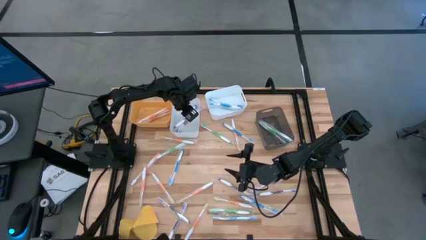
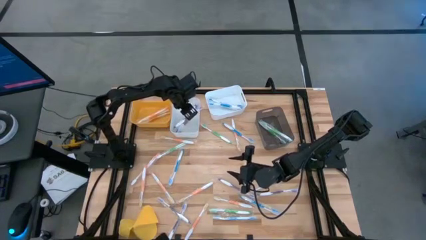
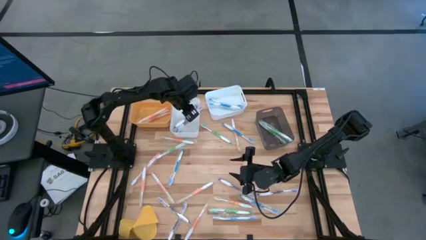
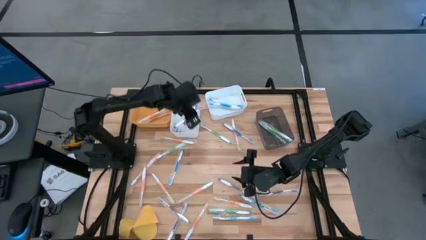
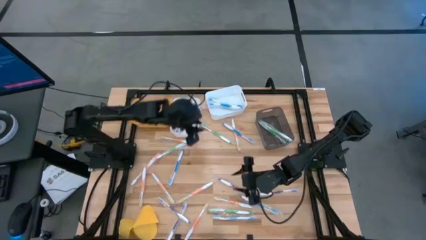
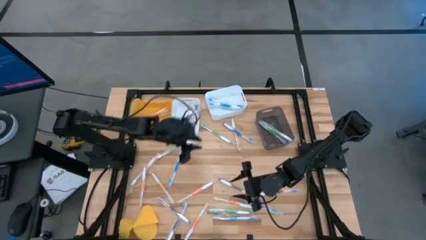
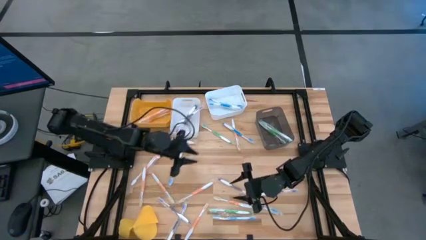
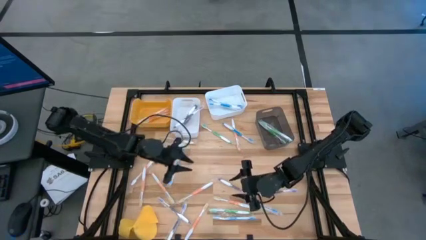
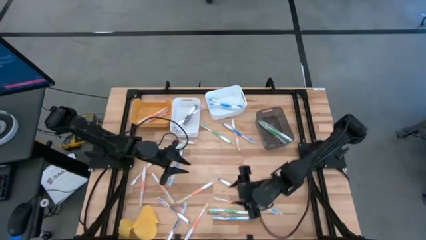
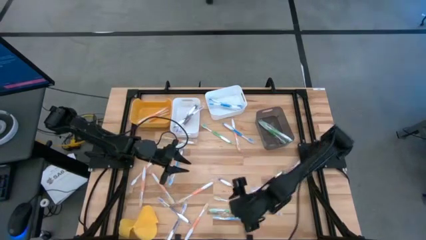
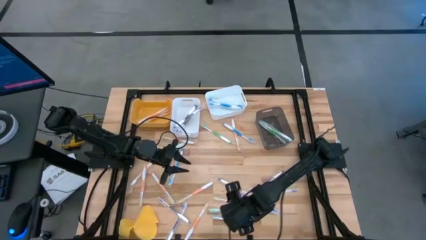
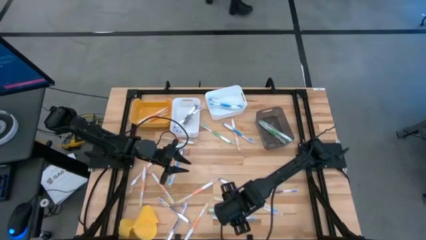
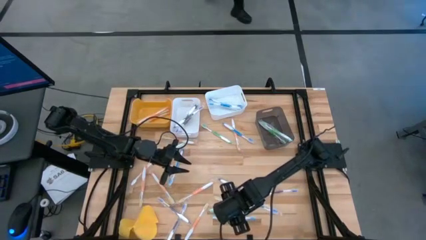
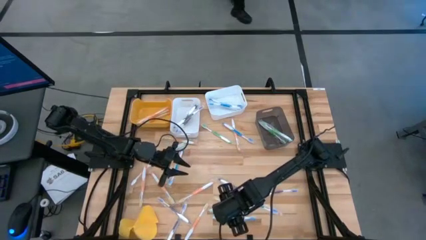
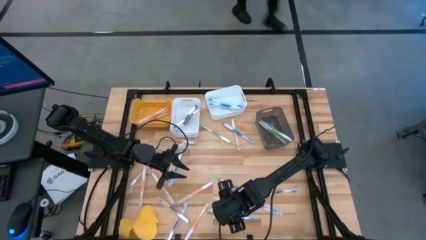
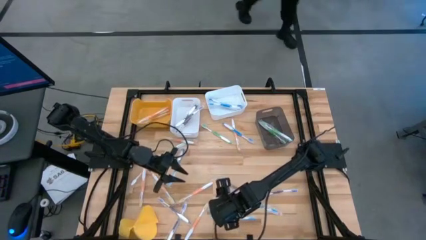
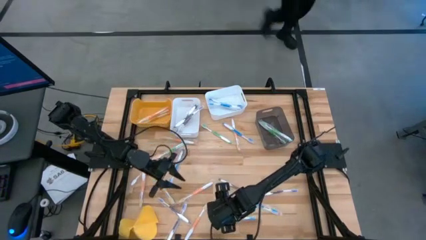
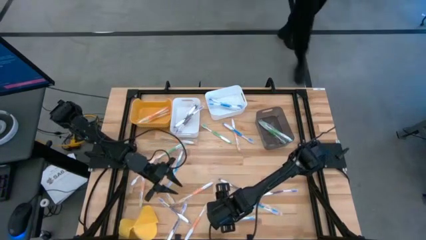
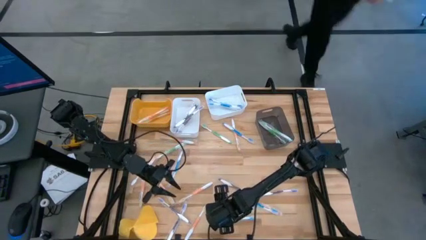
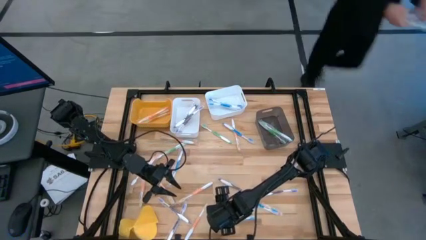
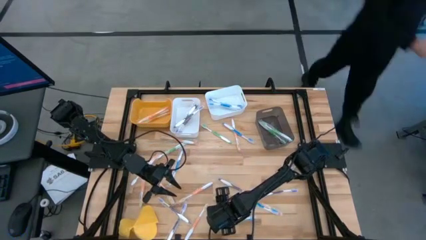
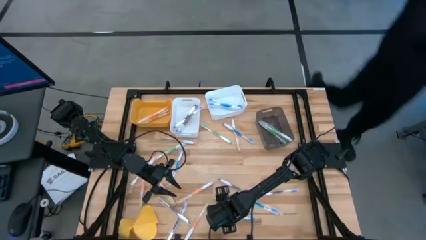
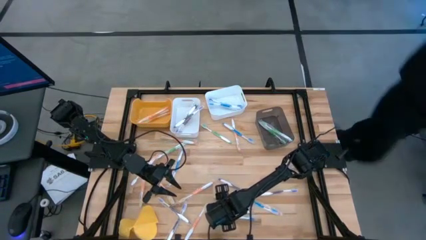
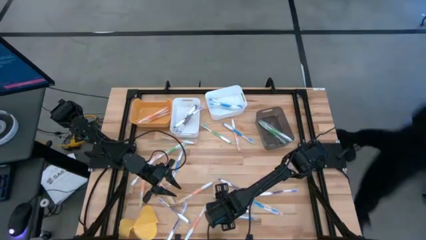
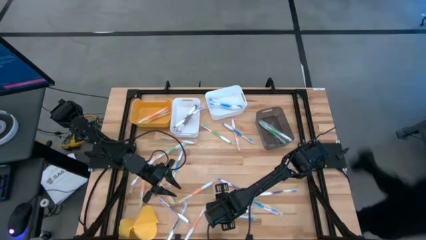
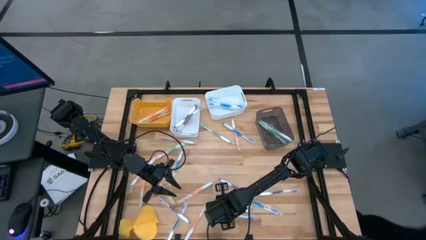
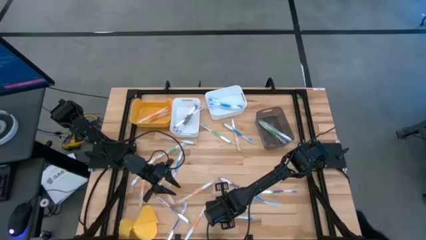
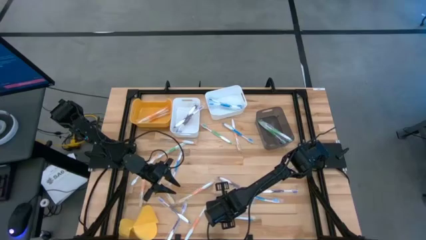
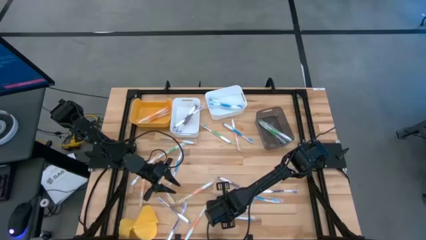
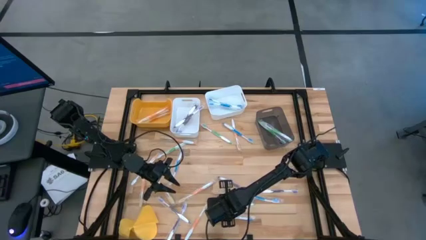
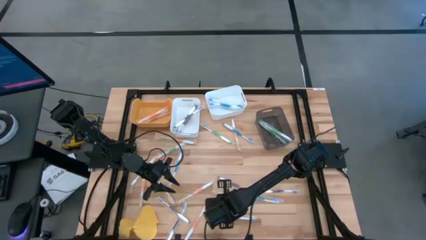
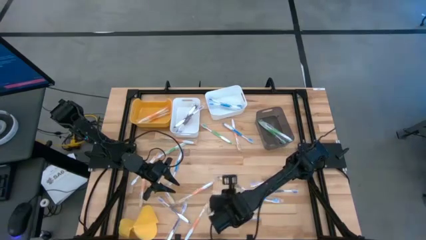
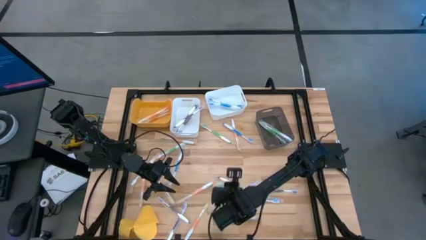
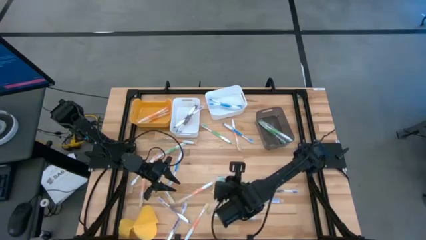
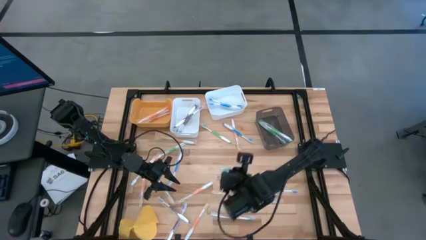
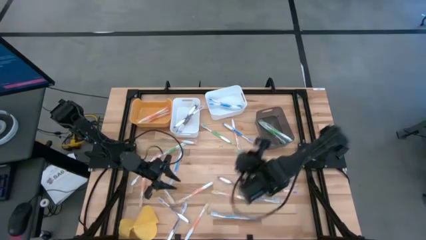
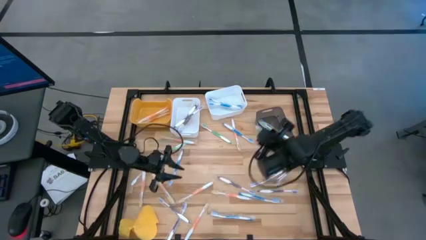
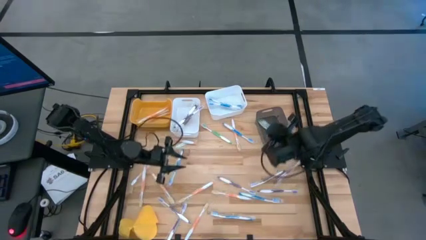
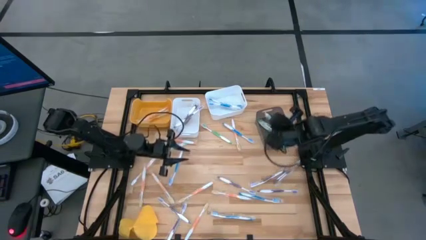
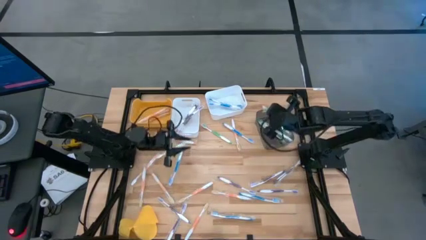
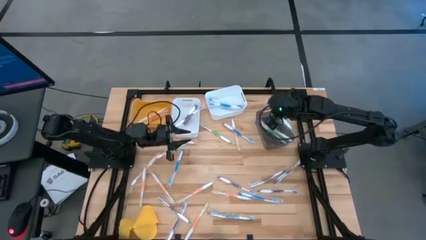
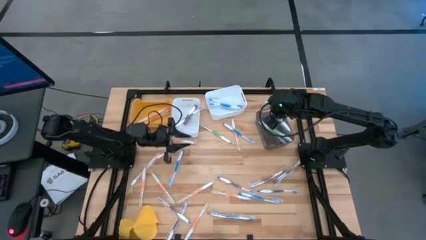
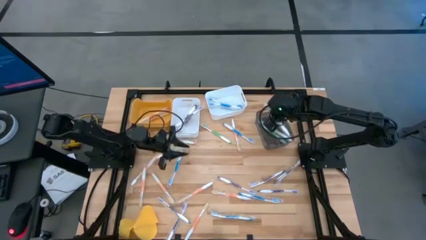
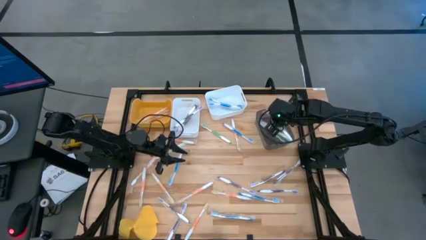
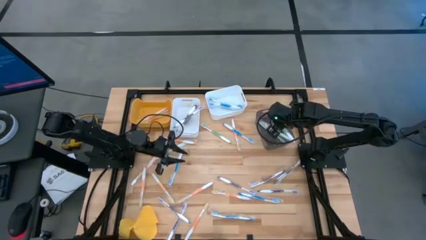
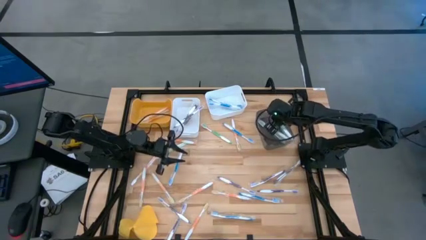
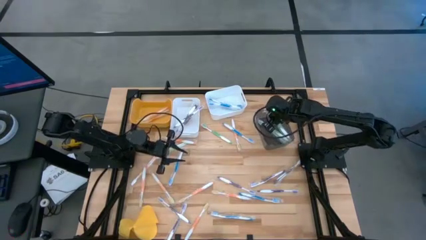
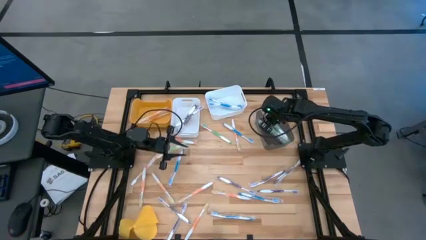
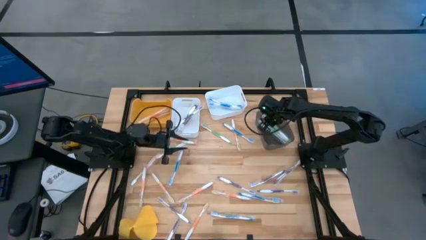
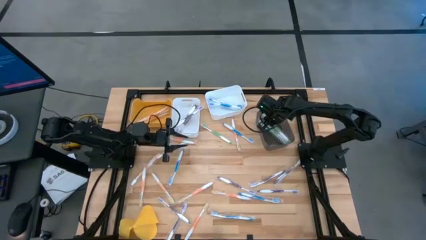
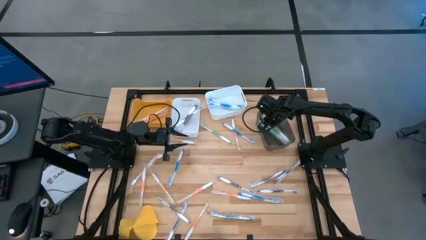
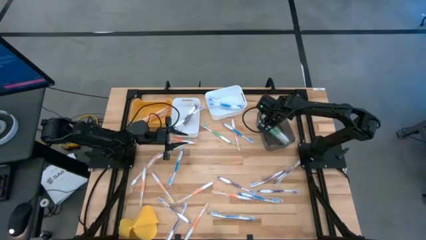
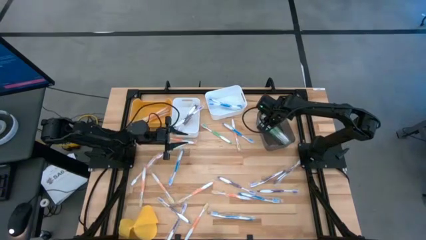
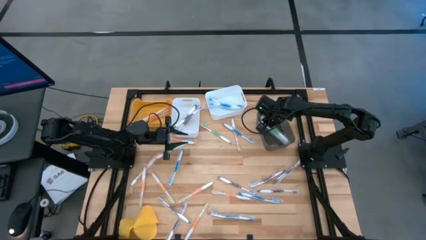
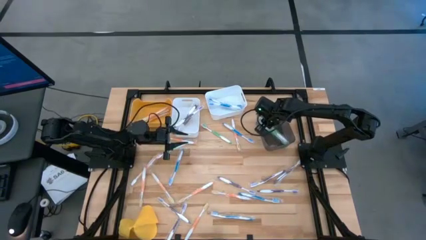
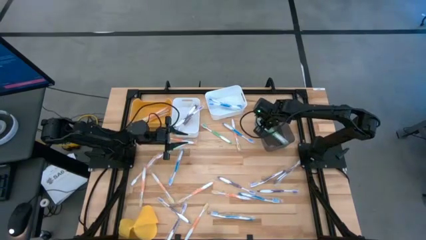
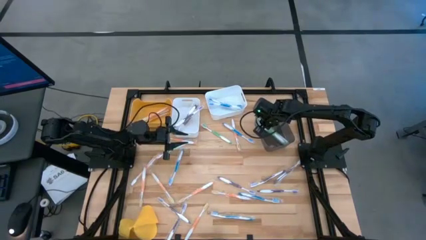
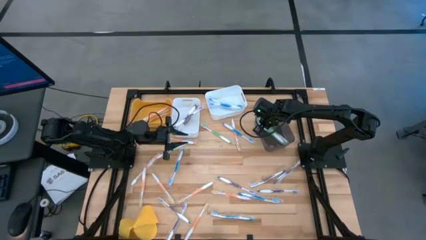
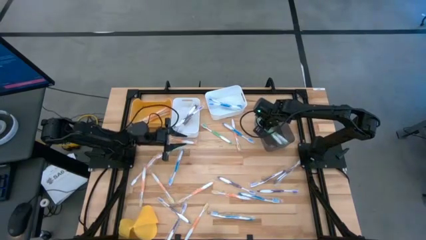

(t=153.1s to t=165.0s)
Task: Pick & Place Toothbrushes
Put the green toothbrush into the black bin

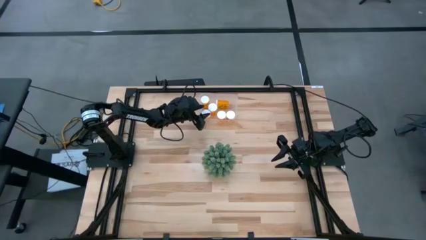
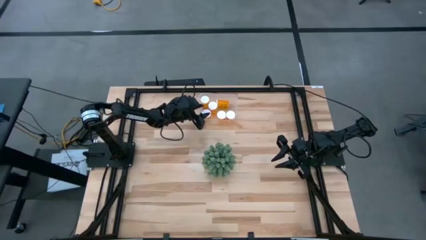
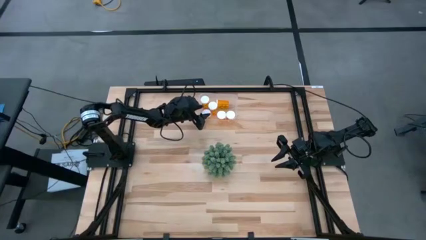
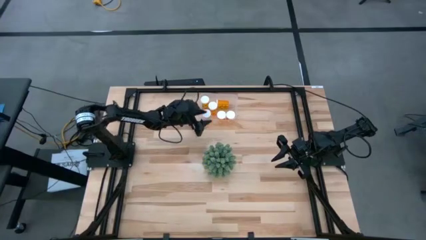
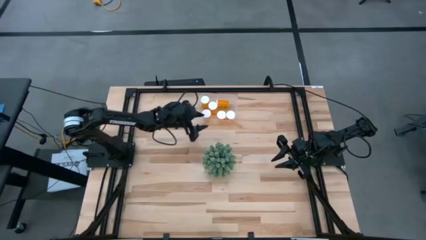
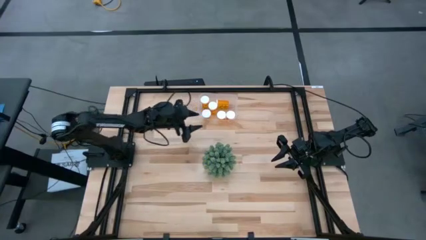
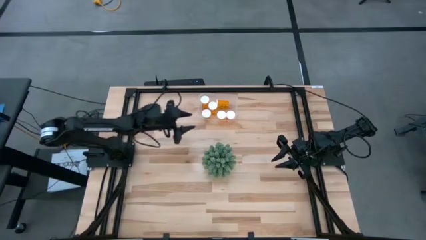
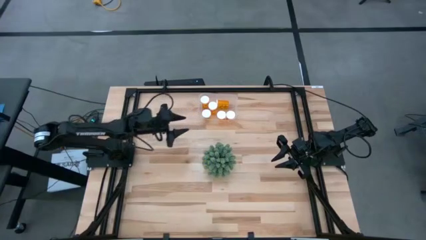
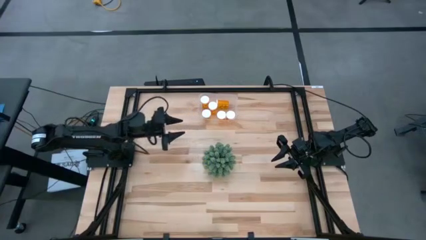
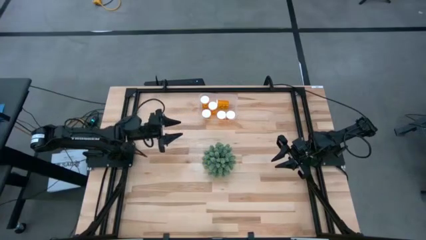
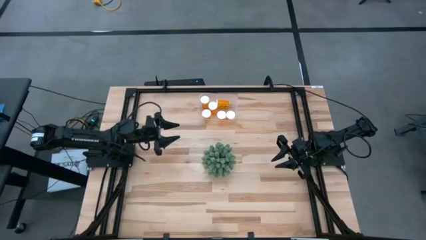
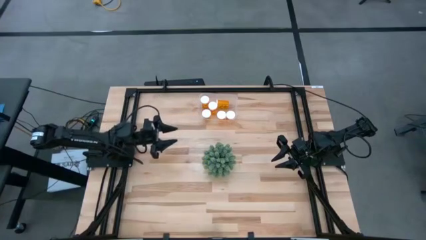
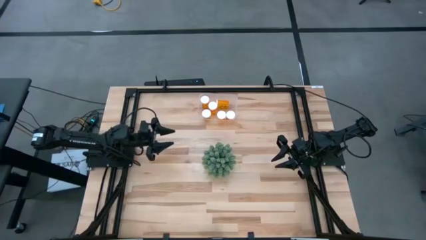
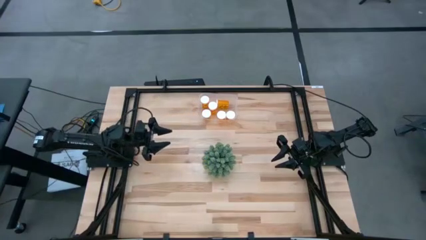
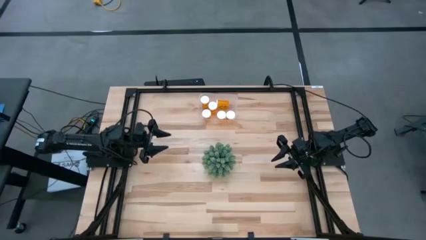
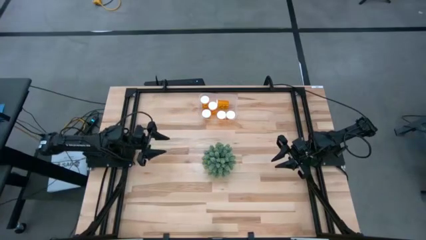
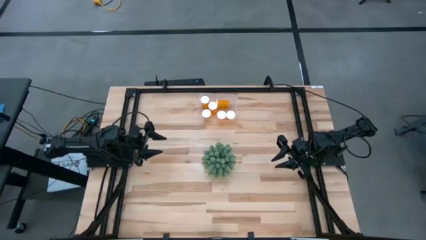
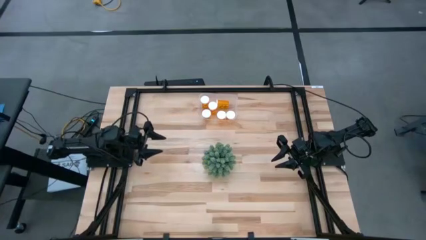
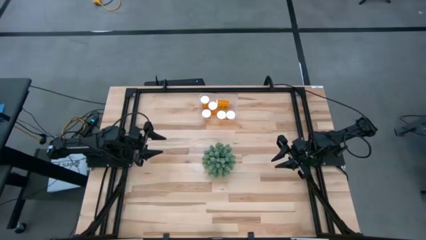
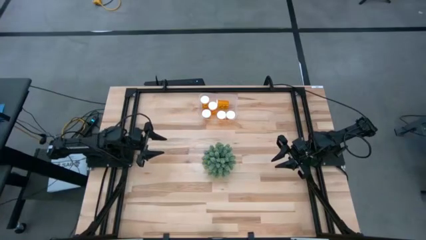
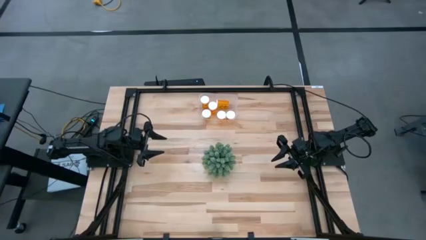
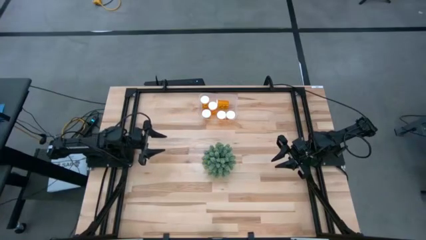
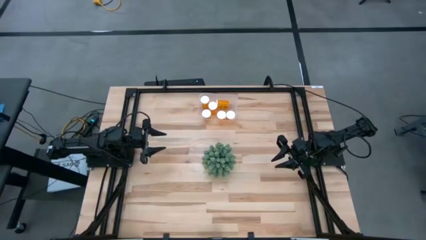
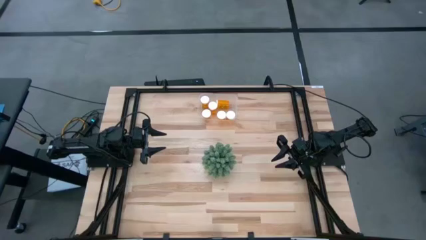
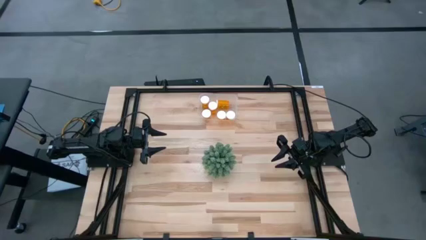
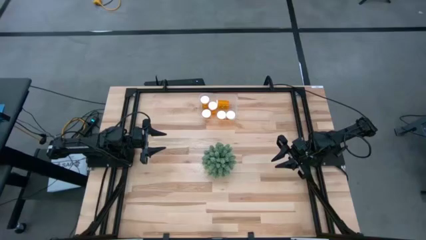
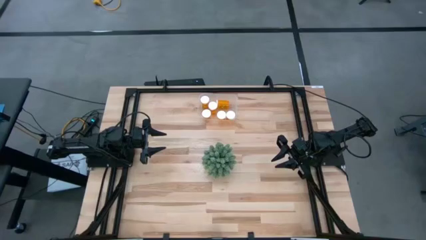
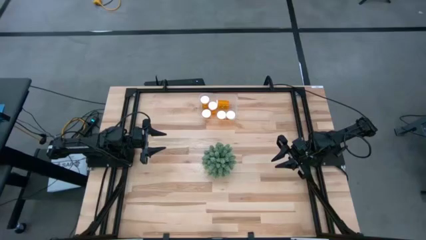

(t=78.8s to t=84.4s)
Task: Pick and place pill bottles into a basket
Return to Home Position
